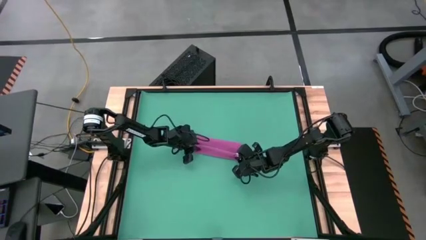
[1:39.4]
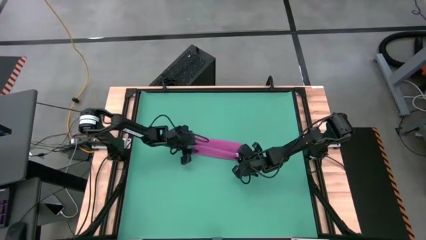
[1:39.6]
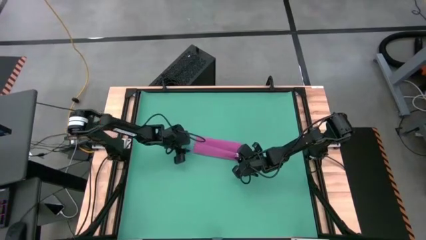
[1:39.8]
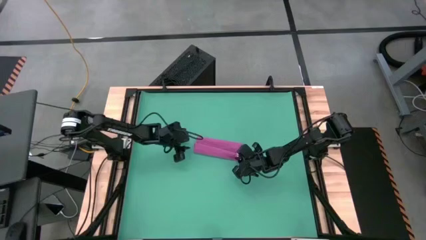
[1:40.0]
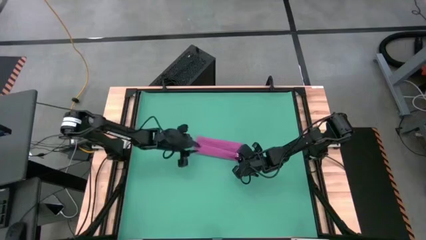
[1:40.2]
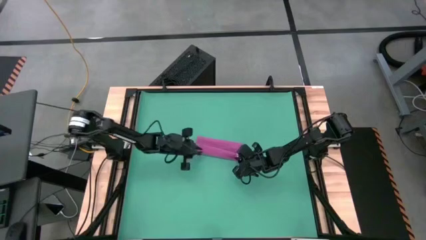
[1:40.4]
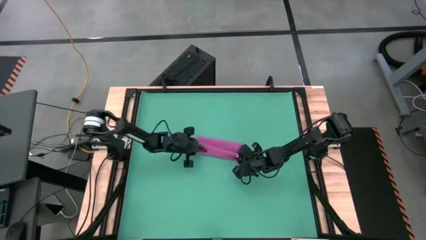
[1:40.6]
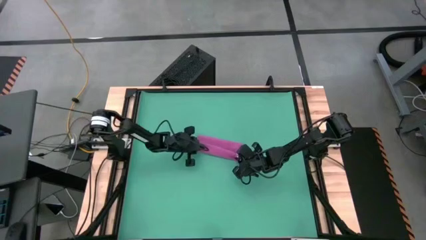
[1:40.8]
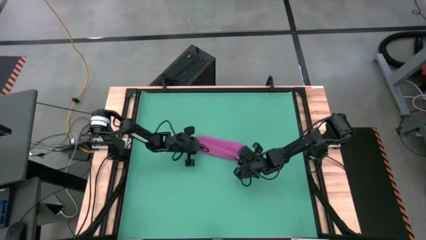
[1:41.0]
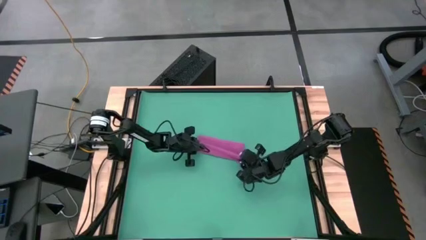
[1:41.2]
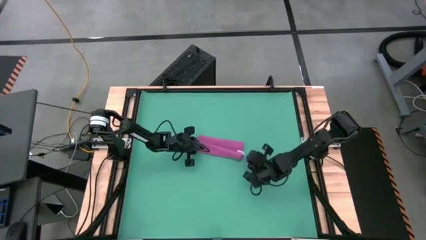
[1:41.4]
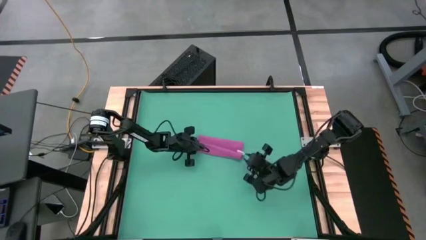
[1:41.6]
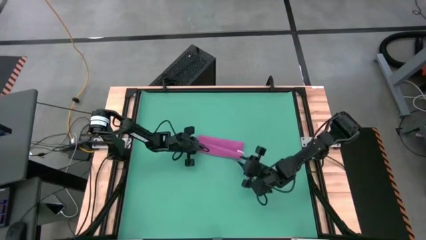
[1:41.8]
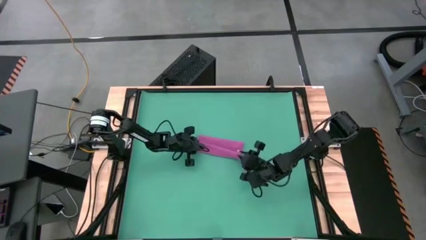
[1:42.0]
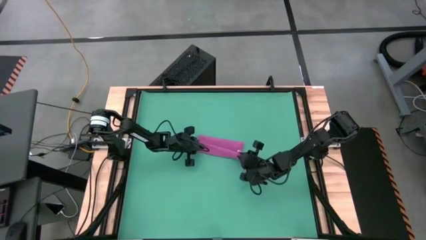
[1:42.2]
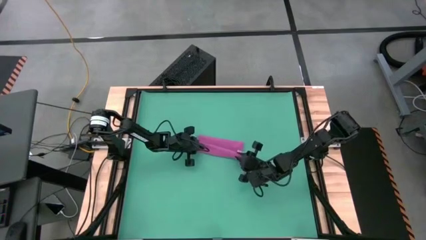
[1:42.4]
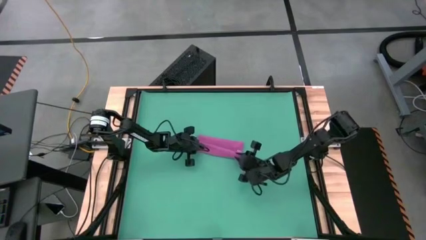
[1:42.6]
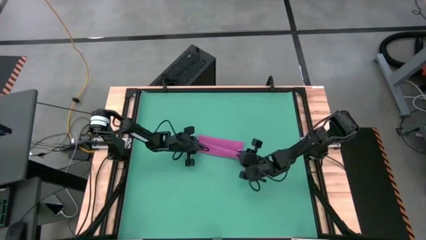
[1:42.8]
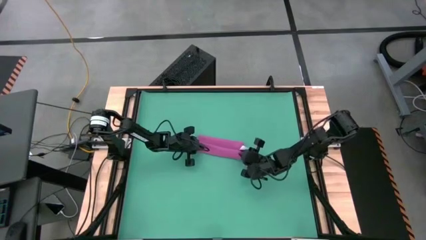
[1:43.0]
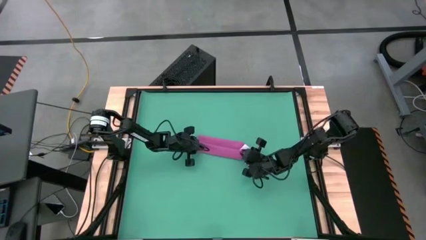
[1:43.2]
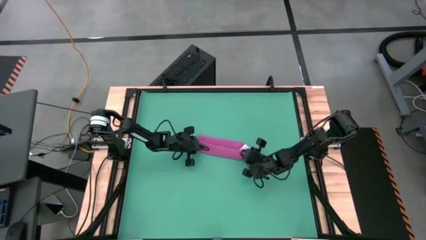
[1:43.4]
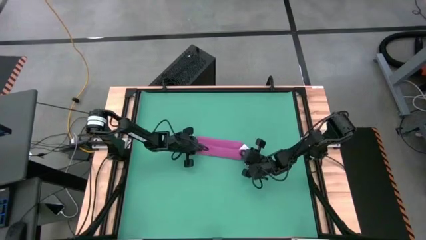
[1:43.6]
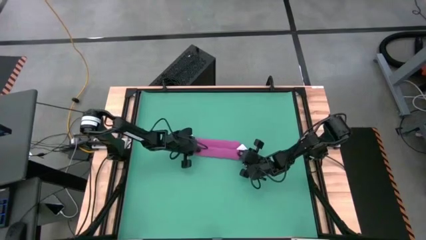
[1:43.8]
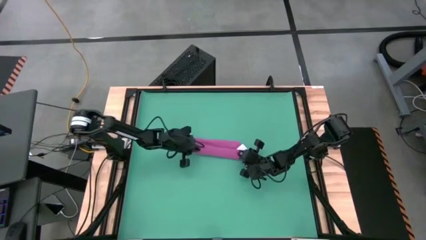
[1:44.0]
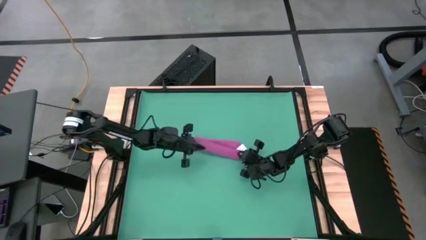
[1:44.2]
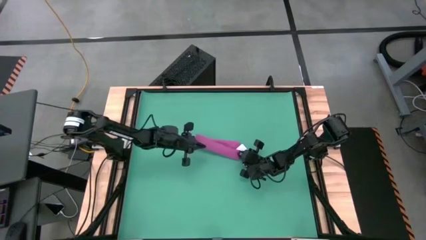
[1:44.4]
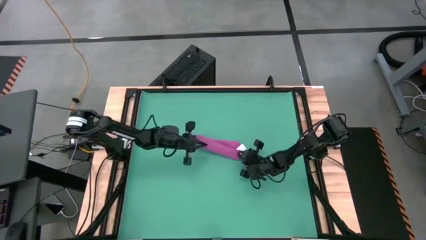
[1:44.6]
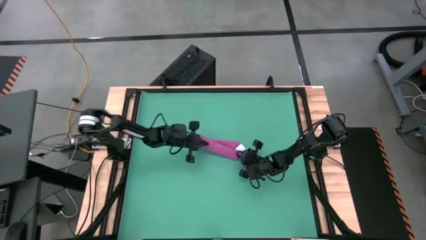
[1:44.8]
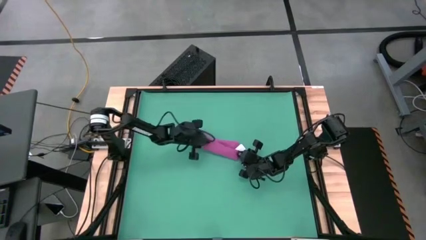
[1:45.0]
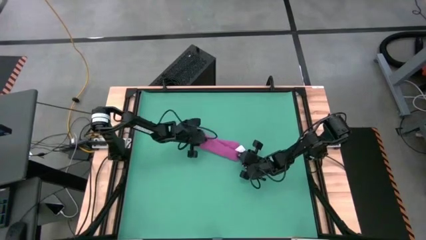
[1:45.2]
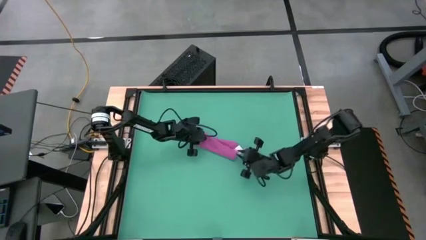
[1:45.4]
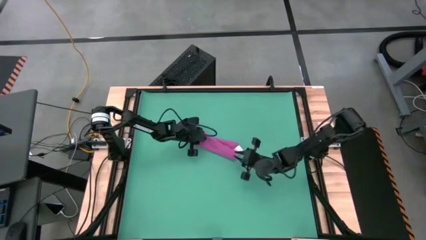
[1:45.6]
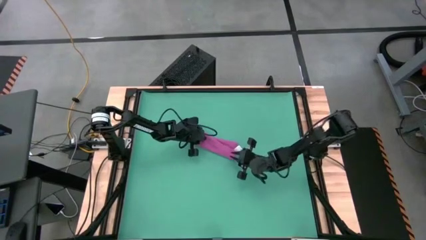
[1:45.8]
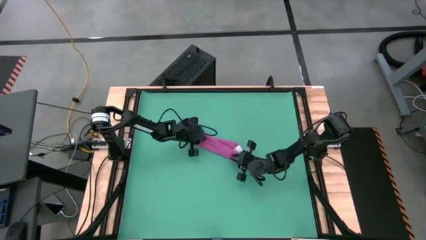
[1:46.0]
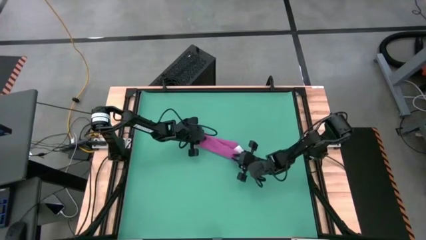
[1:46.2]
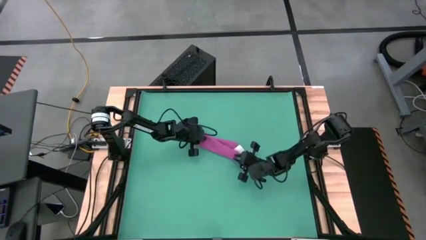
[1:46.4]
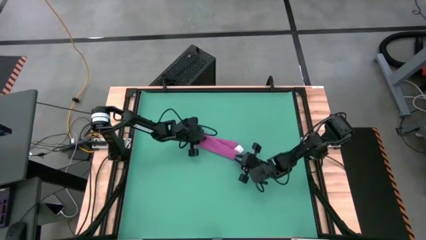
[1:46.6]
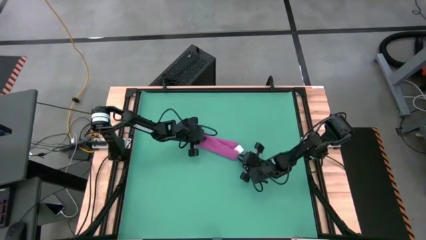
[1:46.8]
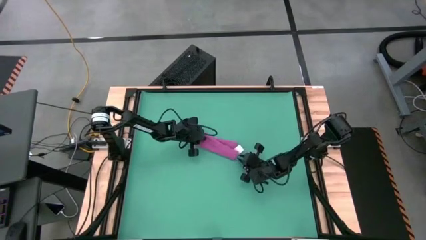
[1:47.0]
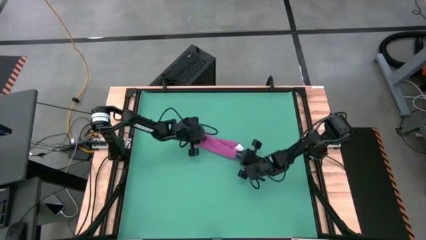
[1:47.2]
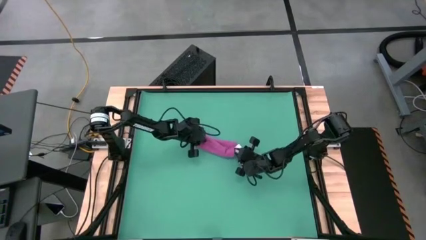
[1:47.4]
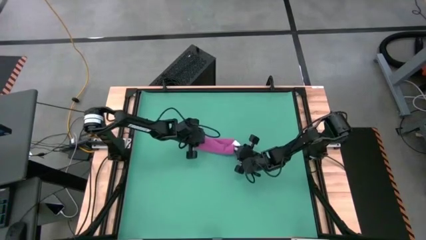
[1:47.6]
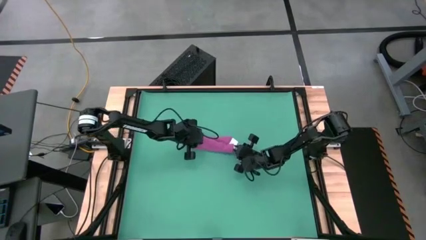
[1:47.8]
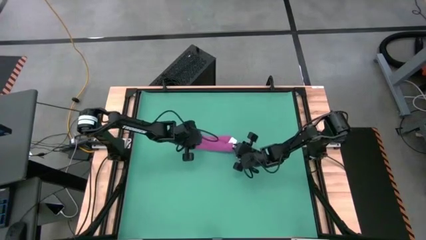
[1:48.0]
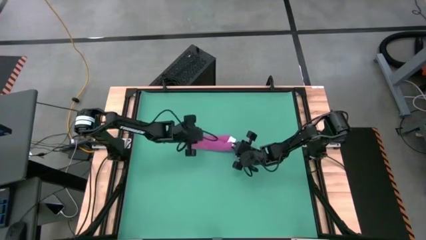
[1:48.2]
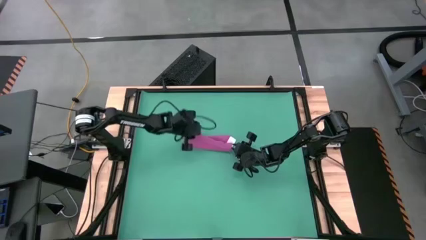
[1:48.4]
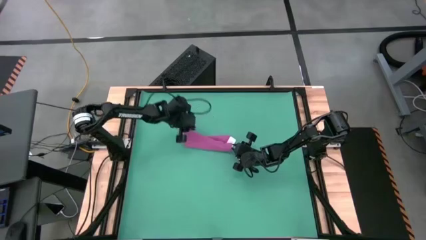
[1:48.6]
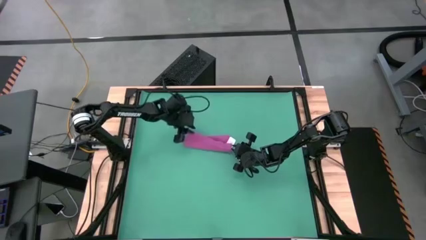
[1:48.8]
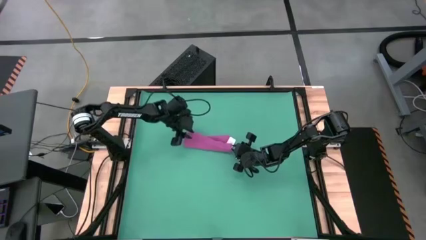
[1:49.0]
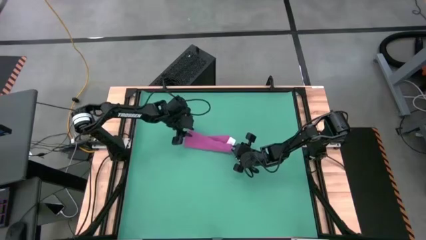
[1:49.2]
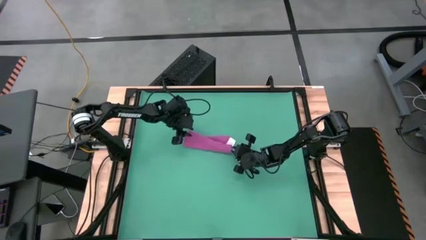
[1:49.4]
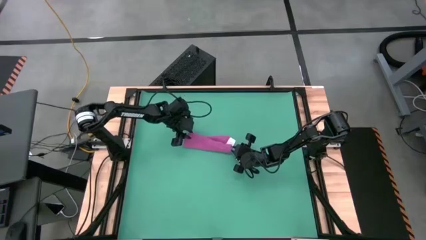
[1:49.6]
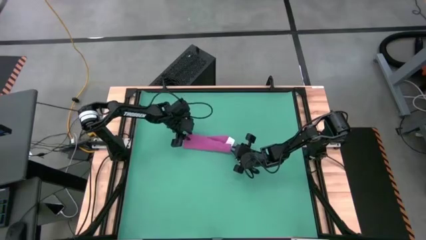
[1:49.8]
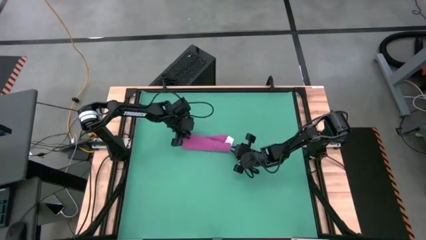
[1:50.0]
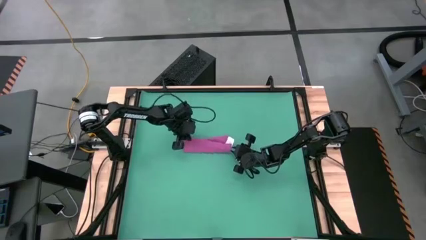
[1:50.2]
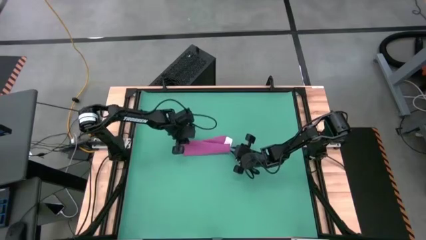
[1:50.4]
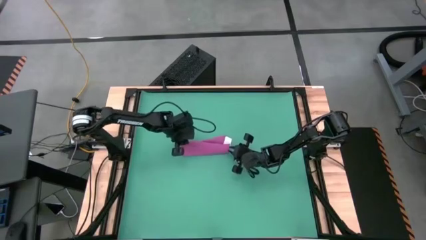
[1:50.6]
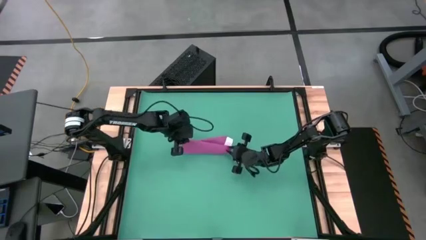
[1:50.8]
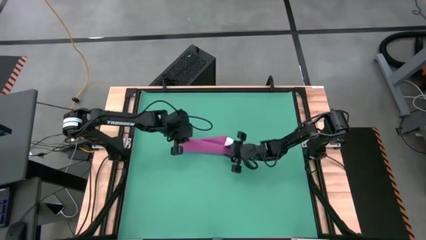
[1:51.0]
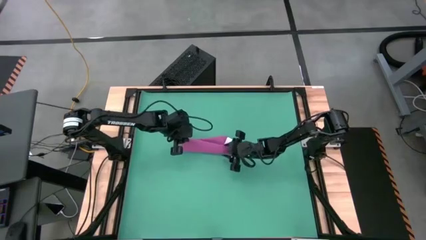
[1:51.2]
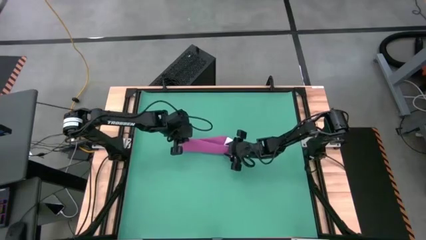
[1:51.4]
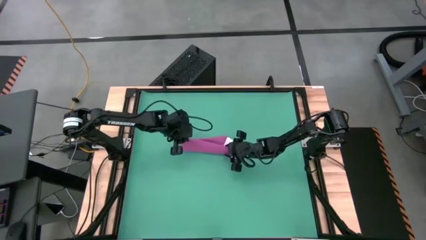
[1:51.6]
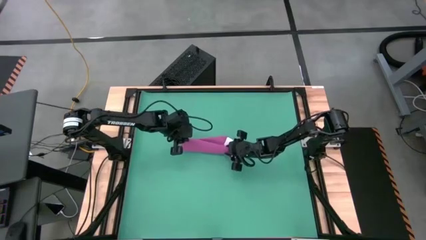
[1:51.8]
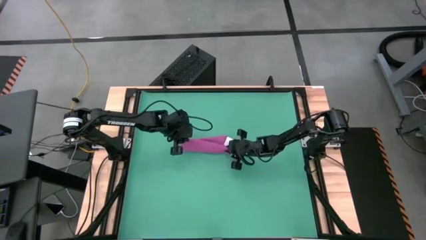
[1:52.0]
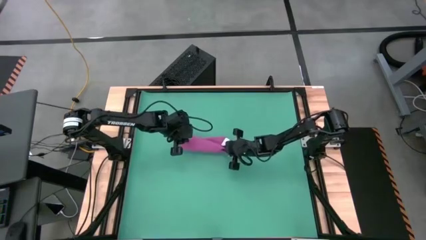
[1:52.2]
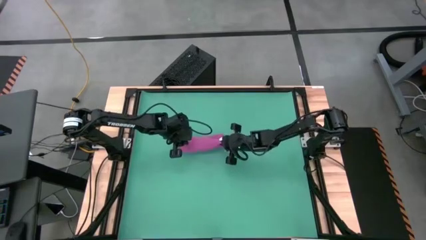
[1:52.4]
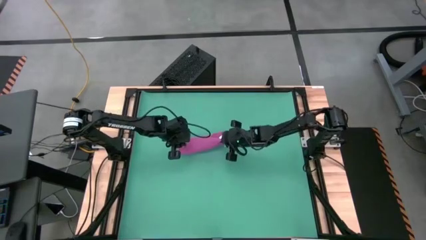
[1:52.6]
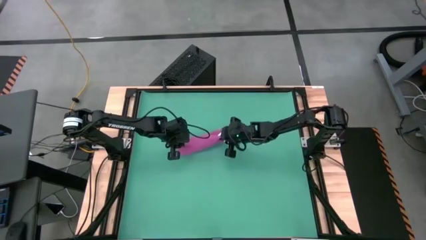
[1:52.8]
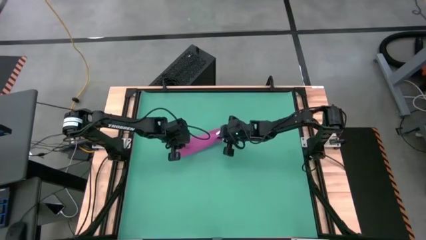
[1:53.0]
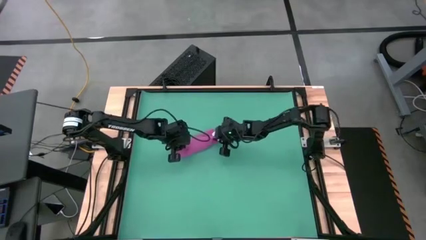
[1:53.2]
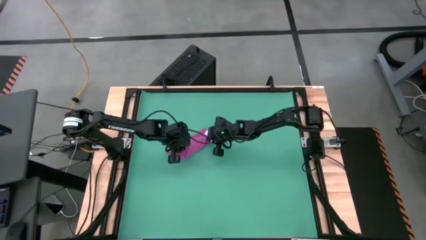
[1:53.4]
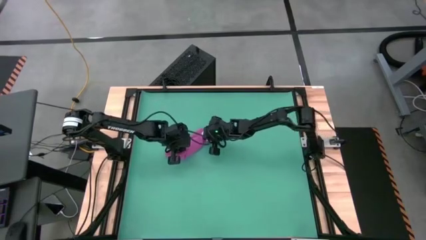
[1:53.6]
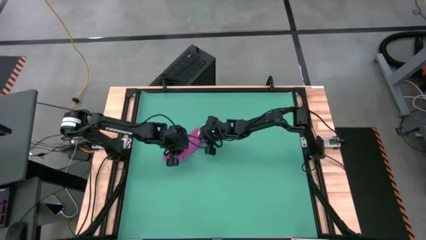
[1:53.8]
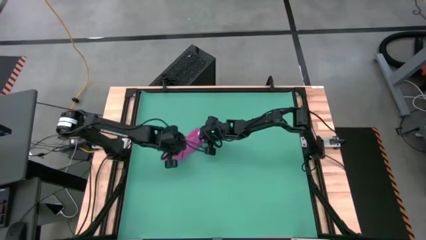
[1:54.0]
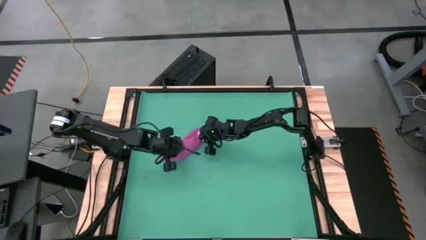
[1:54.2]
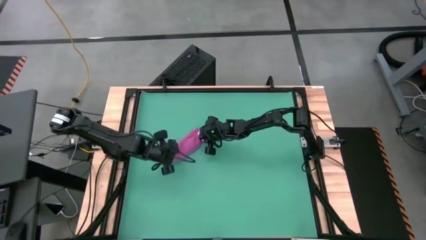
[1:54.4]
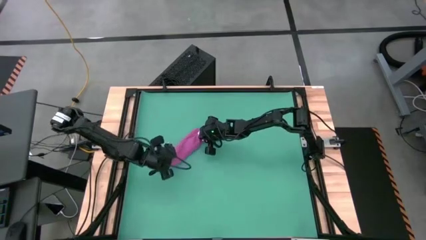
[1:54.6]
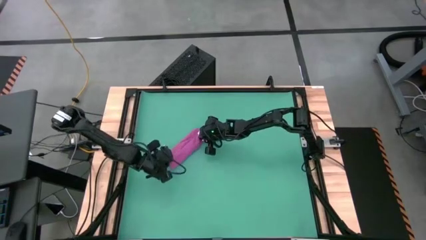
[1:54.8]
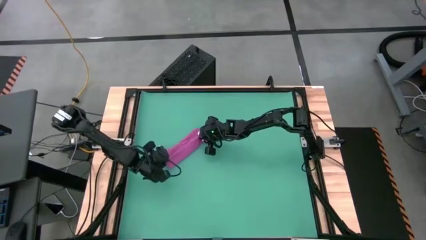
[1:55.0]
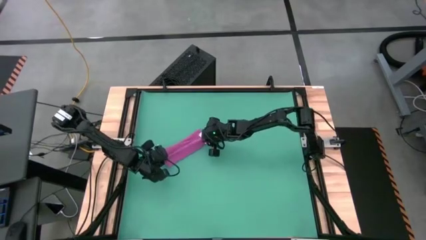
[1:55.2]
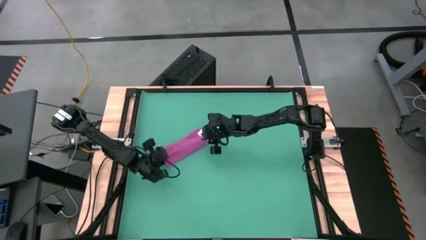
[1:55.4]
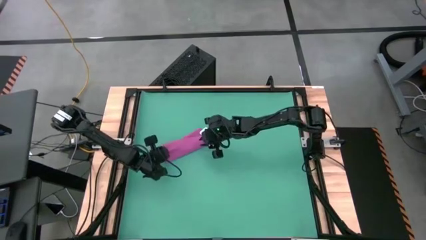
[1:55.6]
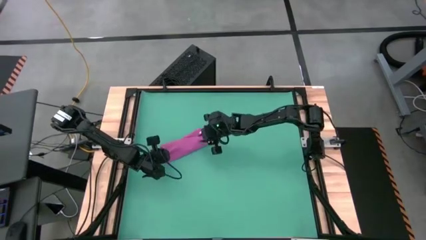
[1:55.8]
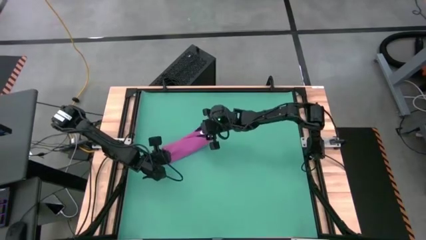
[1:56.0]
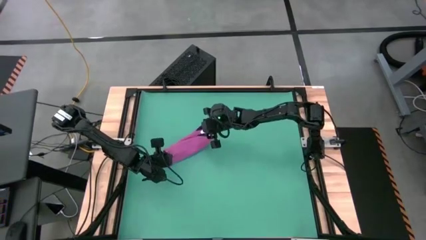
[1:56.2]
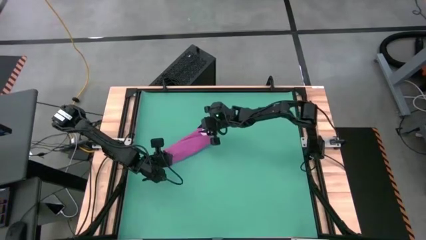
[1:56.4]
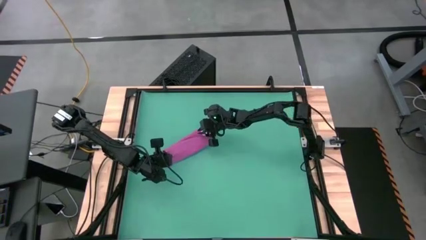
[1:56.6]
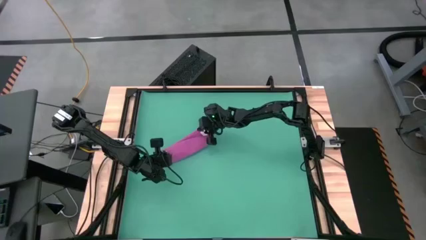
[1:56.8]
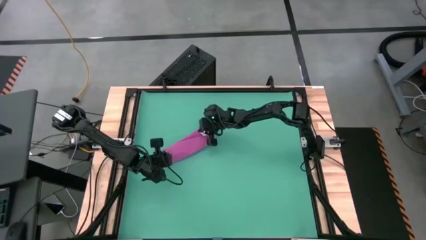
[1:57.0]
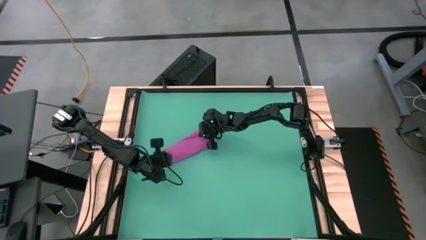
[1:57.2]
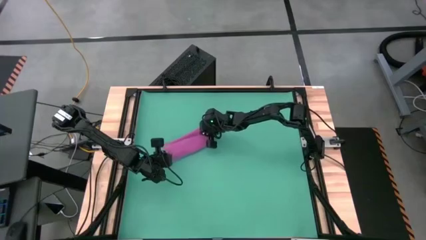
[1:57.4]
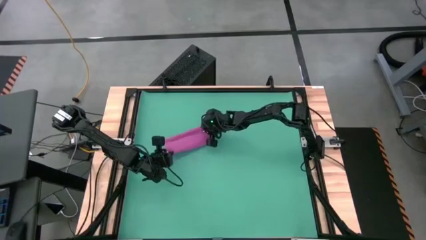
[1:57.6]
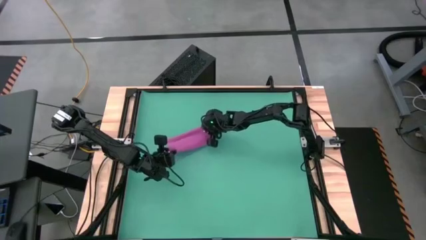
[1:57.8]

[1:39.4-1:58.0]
Task: Roll towel into tight, uniform cylinder
Roll the pink towel
